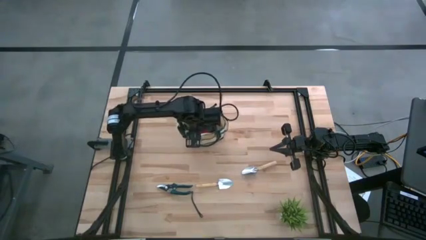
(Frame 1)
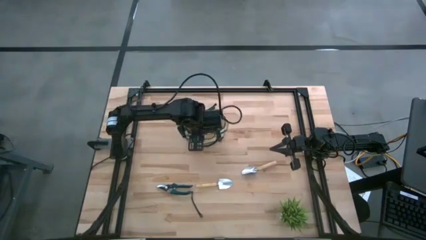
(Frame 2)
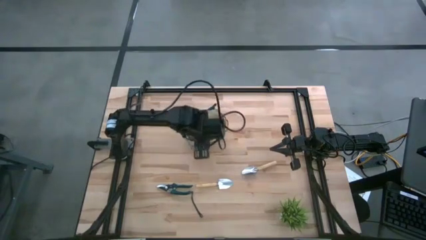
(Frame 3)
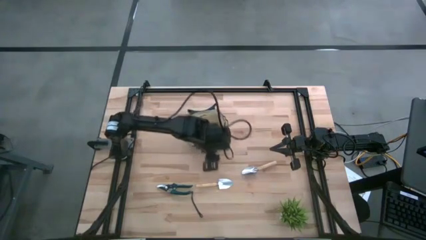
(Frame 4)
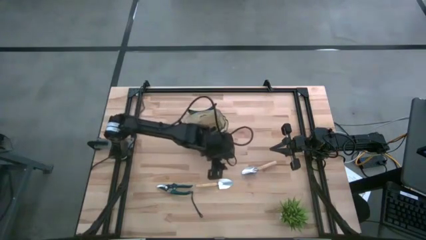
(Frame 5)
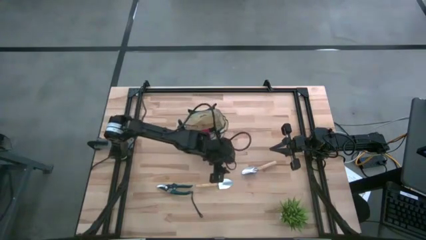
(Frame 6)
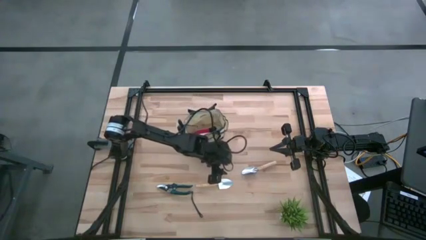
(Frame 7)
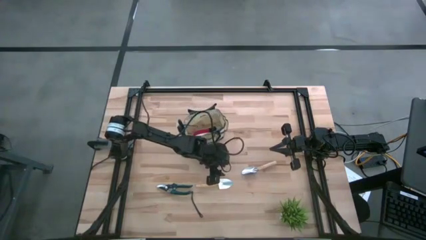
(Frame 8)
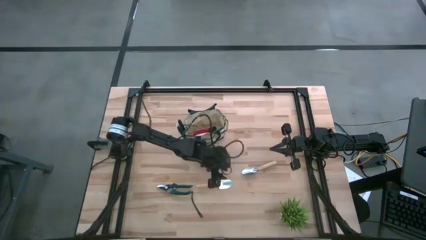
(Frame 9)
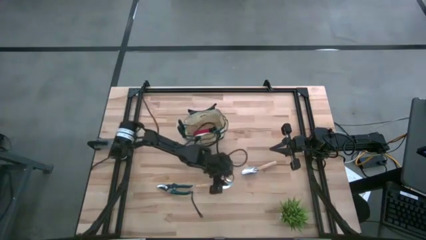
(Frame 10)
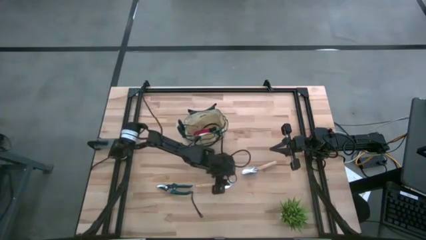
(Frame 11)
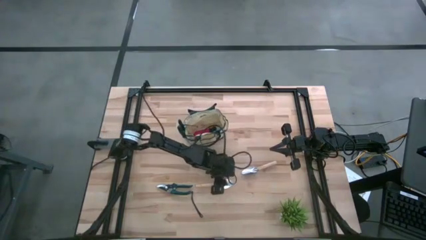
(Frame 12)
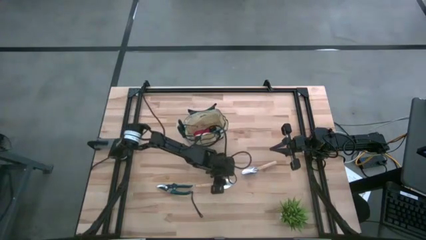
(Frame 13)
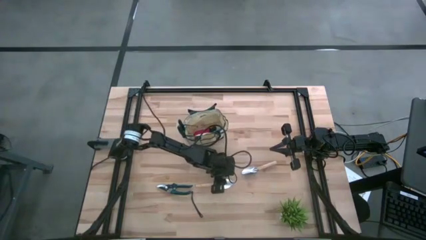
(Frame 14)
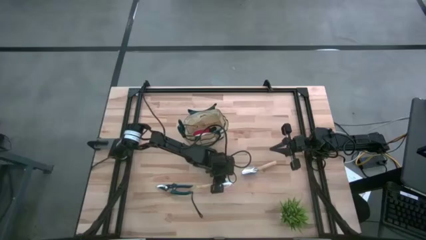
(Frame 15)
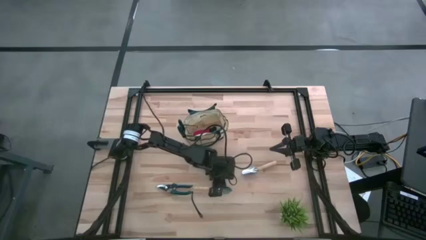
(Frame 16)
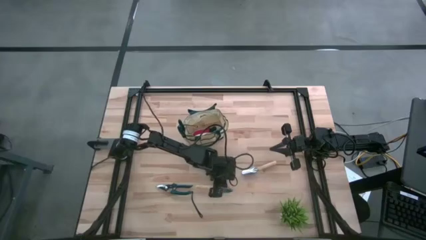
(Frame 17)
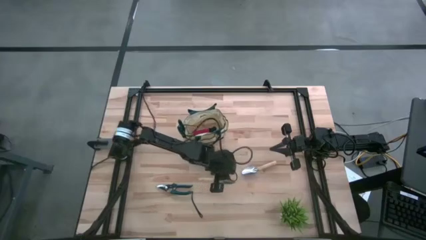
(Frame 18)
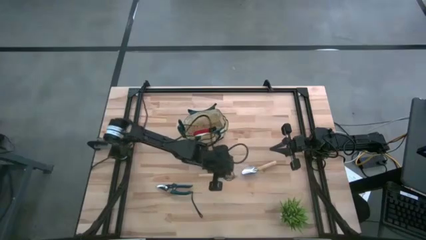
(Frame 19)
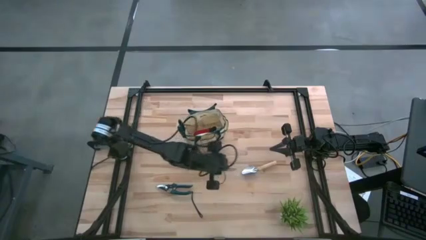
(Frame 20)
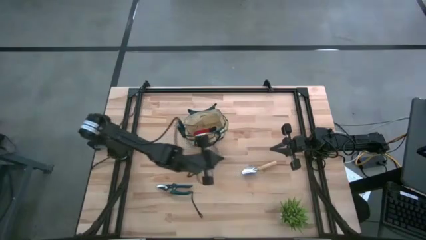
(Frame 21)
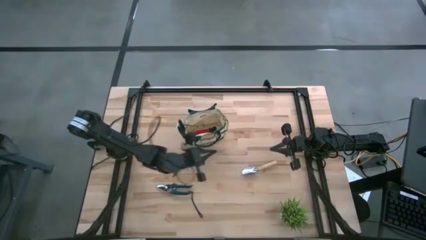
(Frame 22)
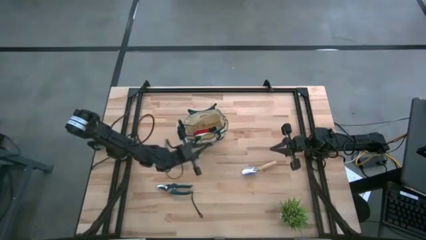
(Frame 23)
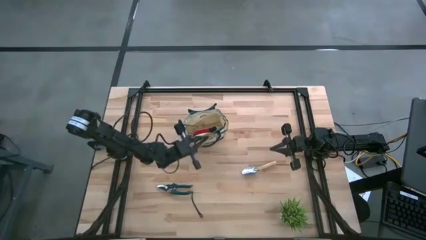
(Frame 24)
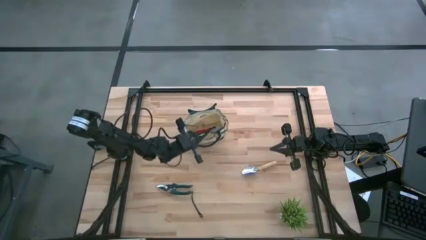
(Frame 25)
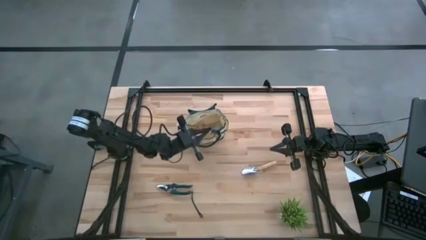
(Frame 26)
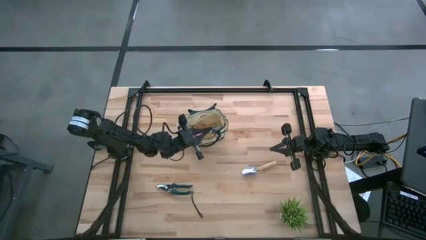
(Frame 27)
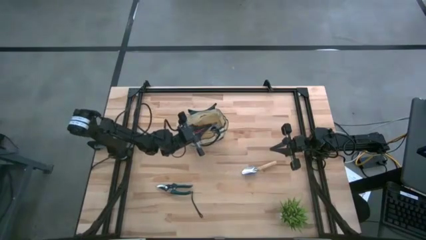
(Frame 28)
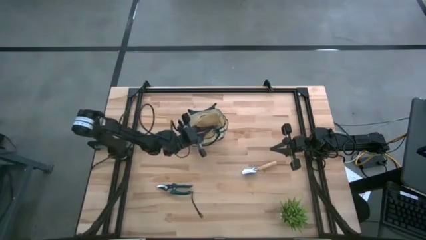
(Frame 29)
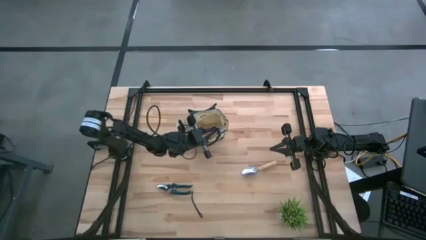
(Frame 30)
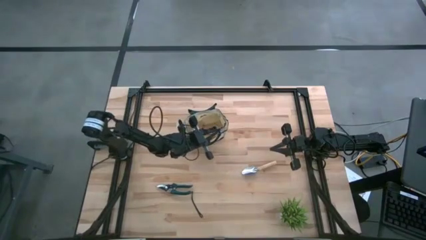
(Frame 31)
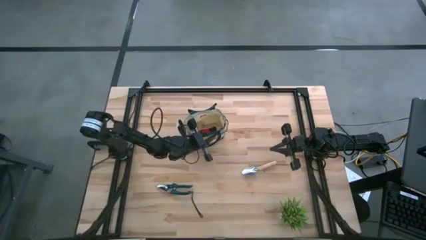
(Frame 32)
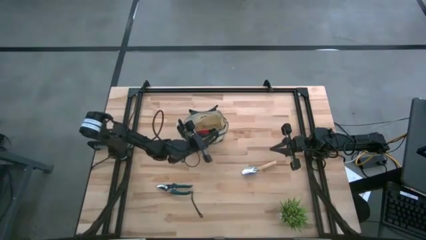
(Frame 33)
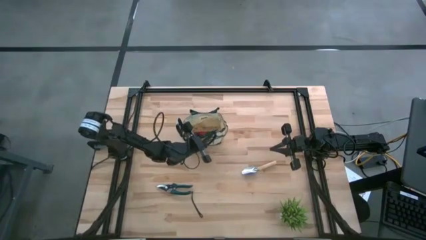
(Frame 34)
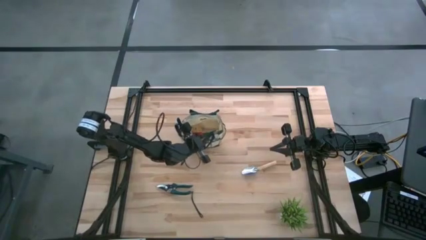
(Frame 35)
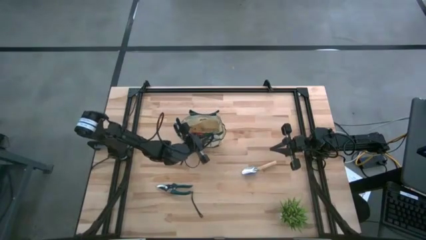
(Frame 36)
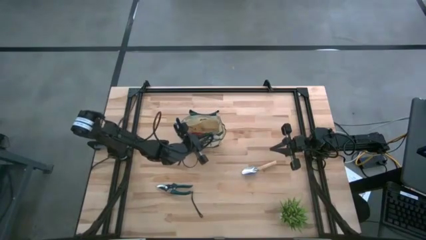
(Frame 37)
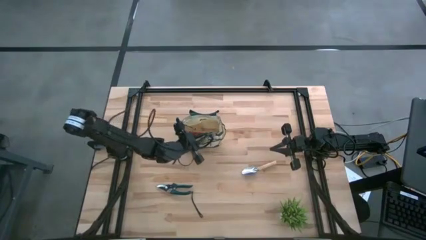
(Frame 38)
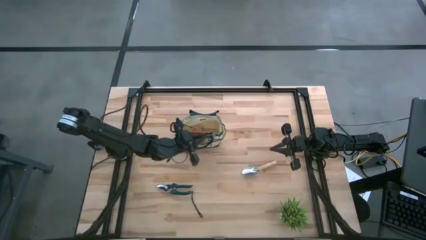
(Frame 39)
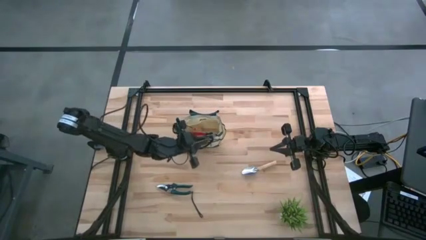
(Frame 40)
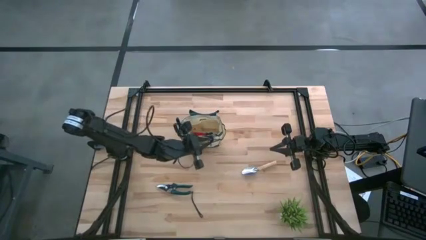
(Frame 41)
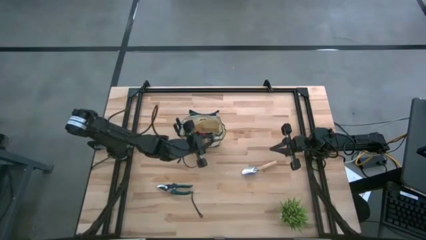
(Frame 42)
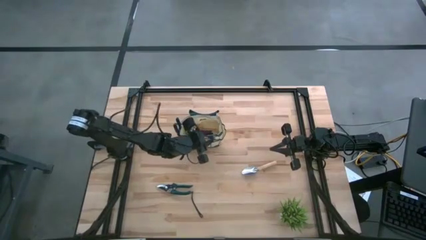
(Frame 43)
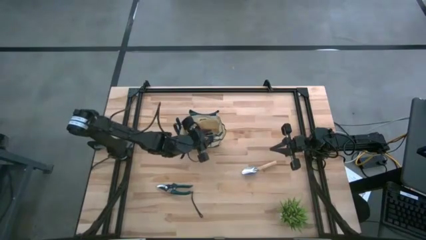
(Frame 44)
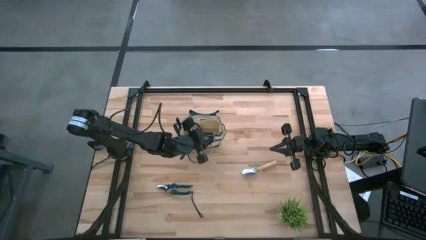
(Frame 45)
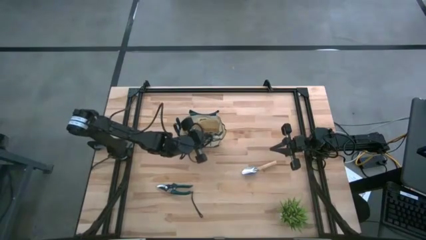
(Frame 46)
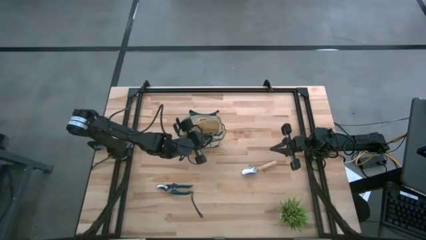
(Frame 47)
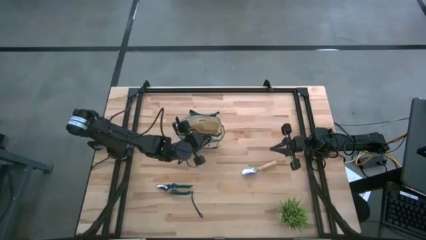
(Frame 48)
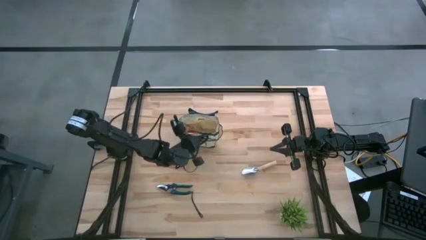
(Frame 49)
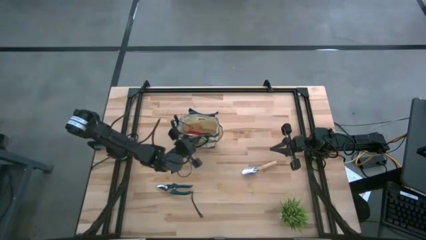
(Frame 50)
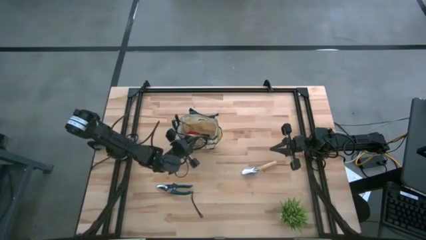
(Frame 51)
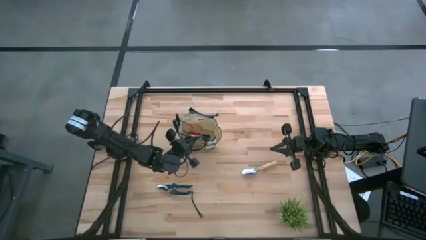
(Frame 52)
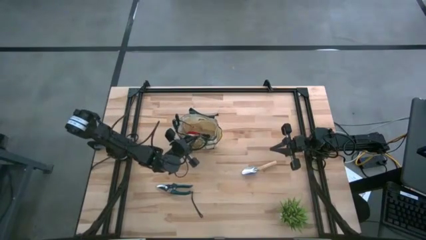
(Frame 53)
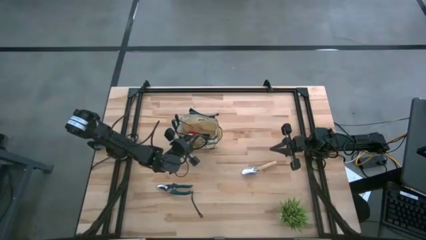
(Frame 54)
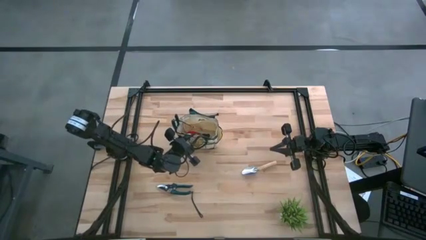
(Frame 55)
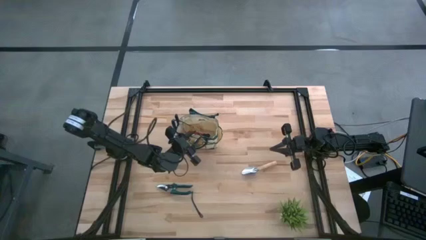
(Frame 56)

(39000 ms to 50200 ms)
Task: Pick & Place Garden tools in Gardening bag
Put the left trowel into the gardening bag
